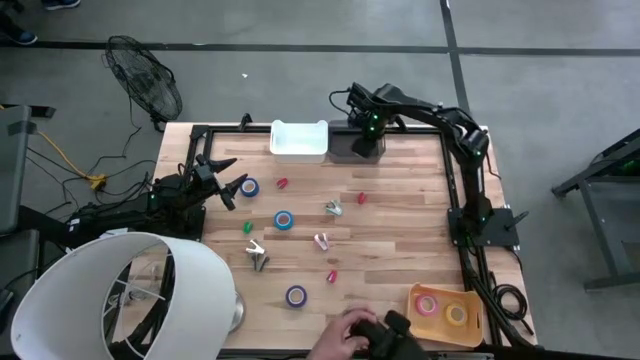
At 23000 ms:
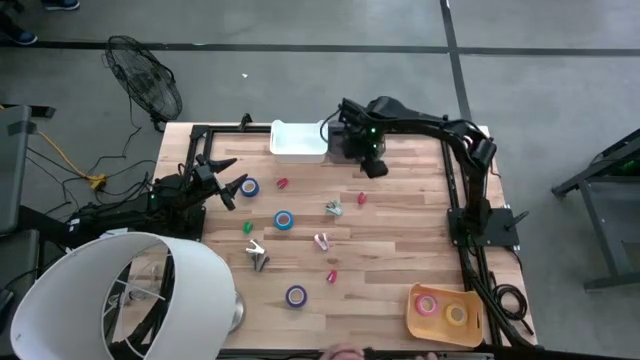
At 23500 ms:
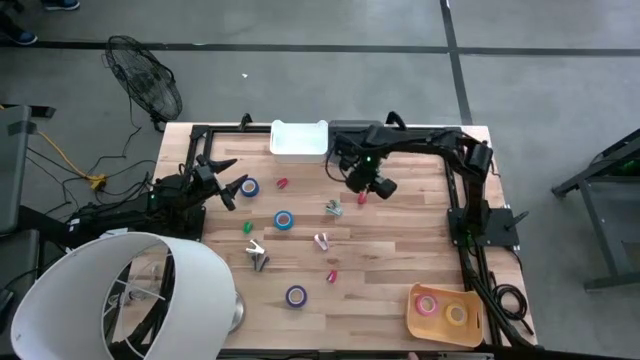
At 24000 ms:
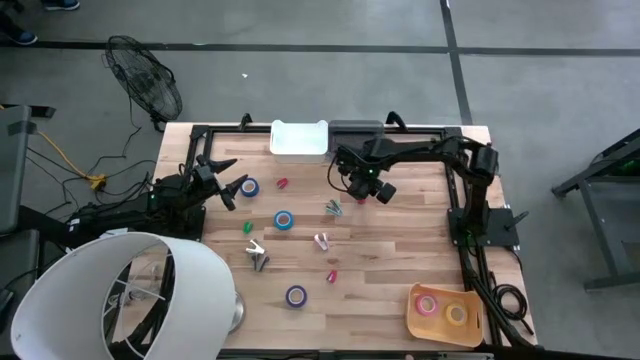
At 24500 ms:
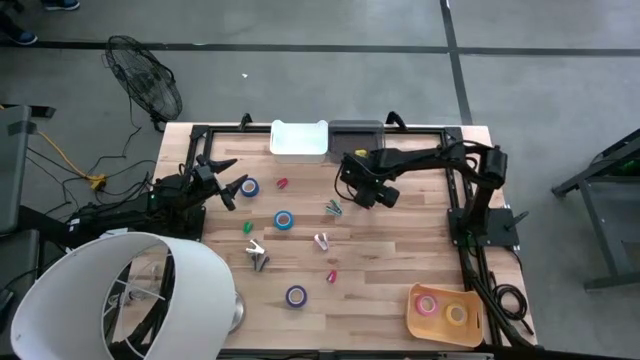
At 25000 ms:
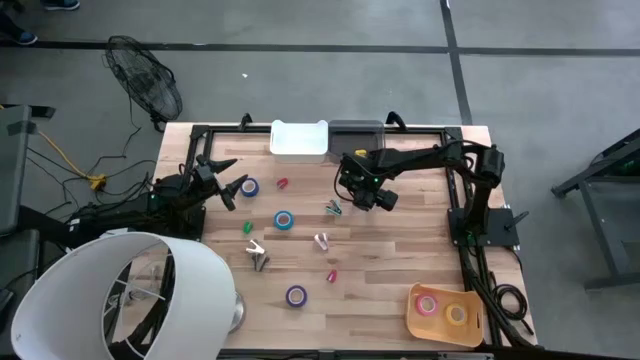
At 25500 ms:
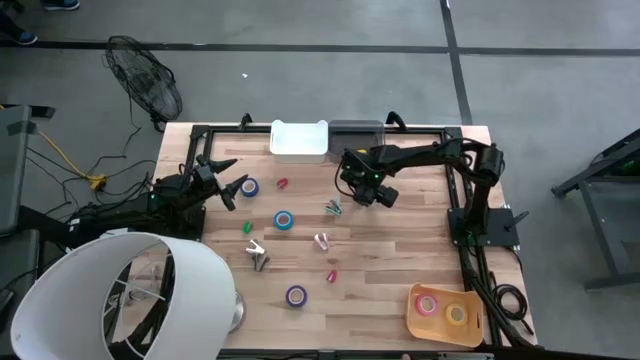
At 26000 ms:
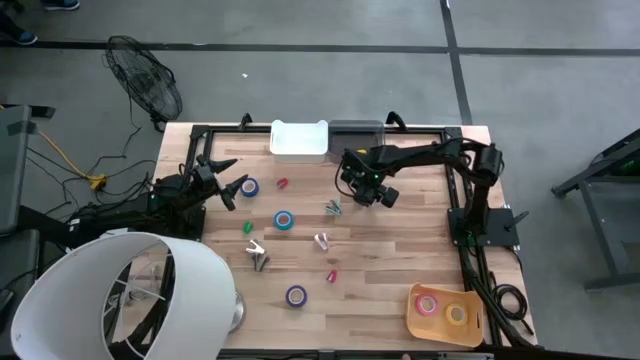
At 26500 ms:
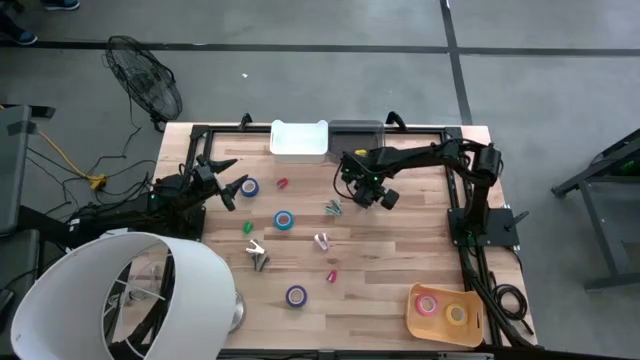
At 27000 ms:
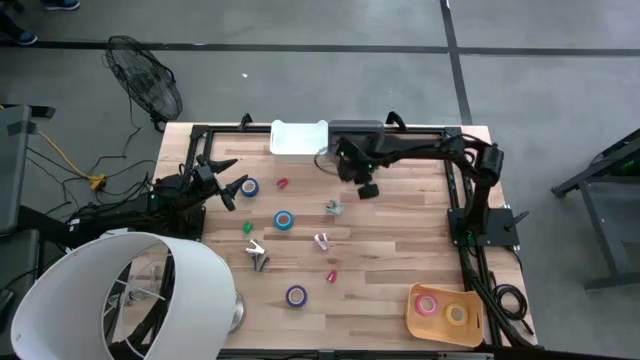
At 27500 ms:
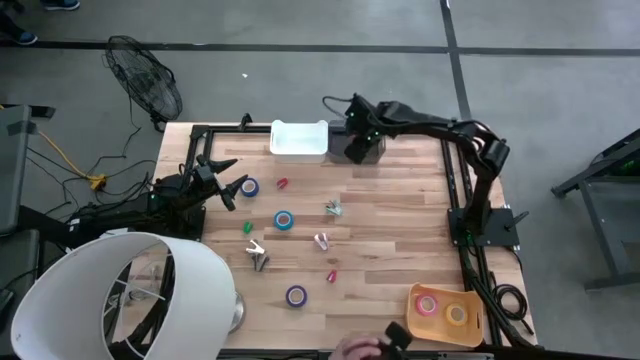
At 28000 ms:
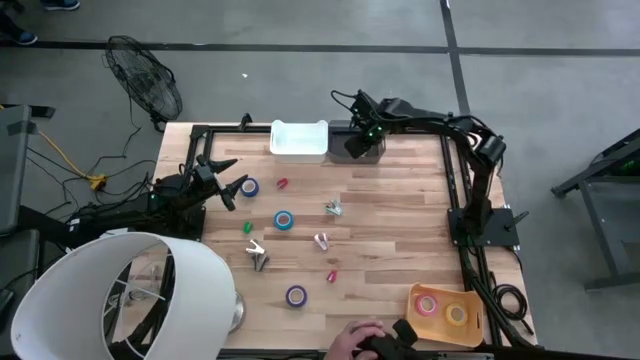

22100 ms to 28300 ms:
Task: Pick and place Stapler, Stapler remover, tape
Put the top right red stapler into the black bin

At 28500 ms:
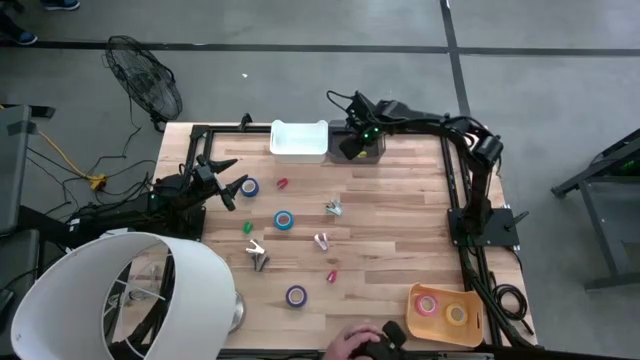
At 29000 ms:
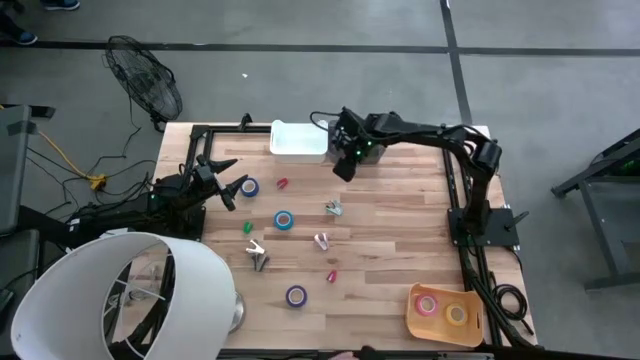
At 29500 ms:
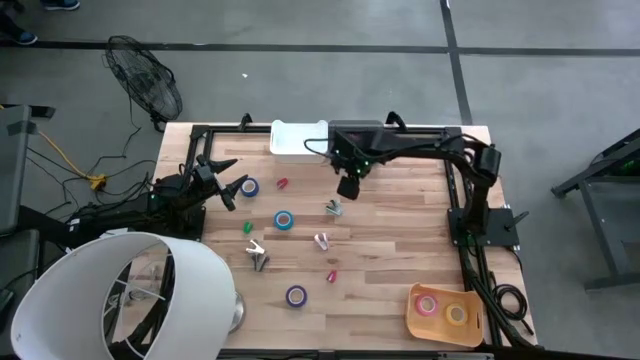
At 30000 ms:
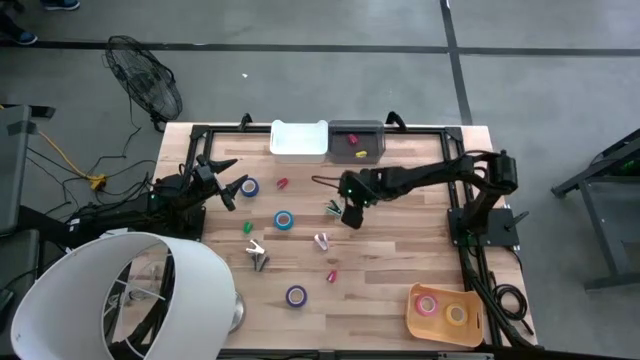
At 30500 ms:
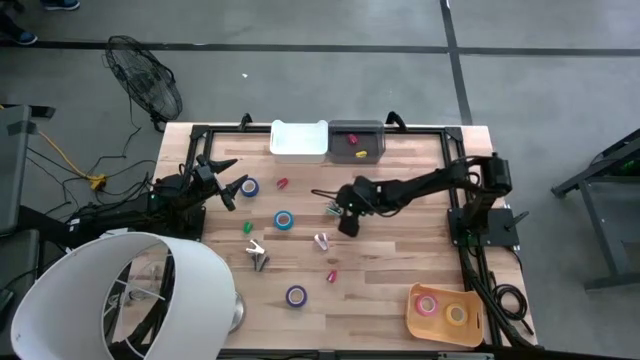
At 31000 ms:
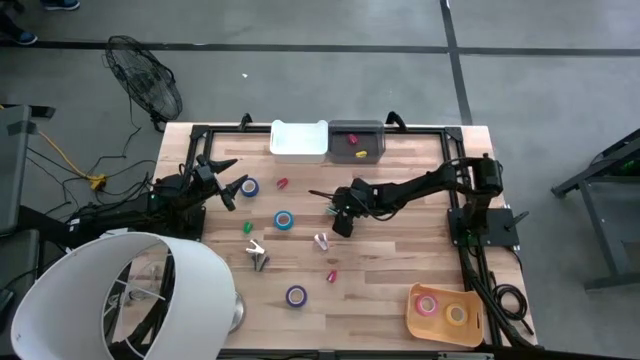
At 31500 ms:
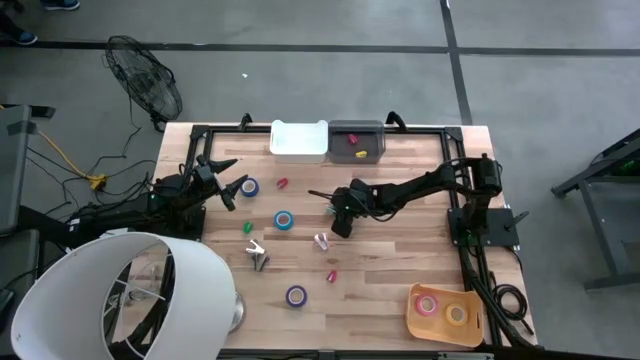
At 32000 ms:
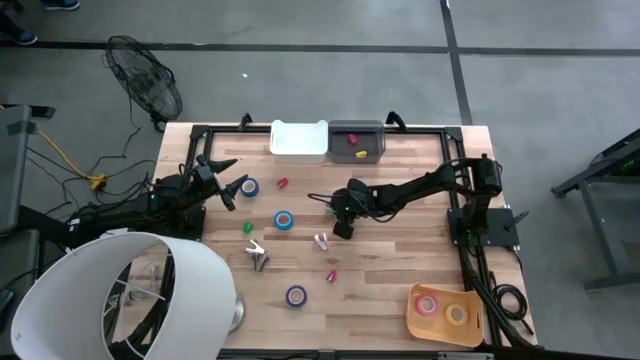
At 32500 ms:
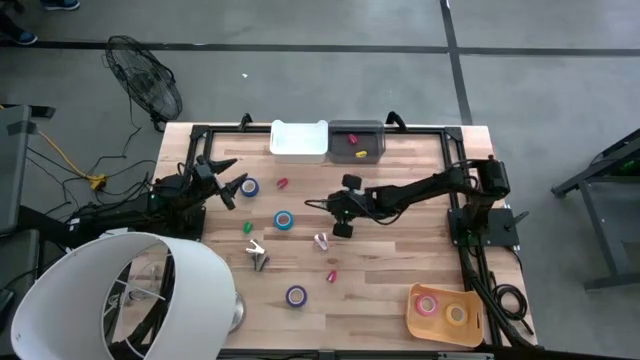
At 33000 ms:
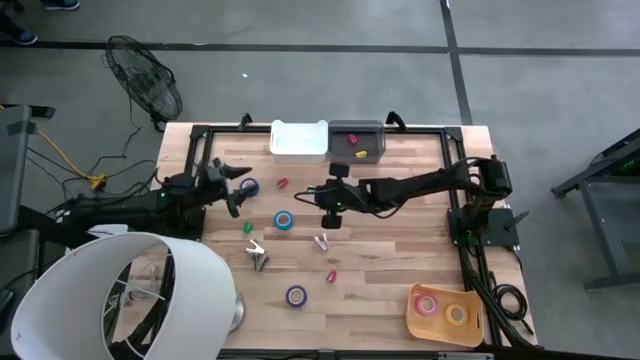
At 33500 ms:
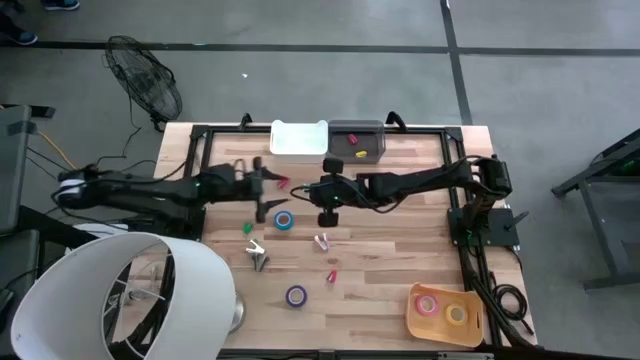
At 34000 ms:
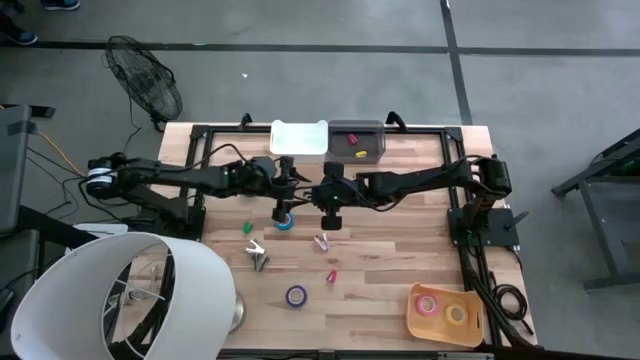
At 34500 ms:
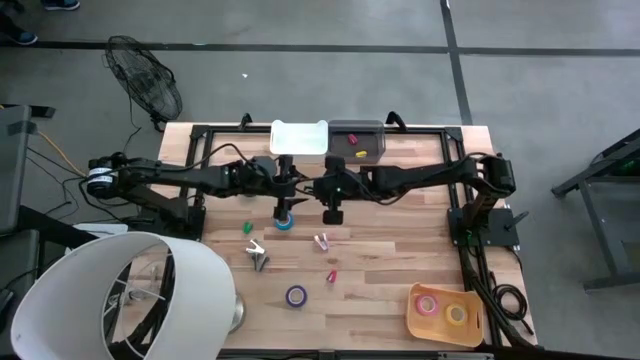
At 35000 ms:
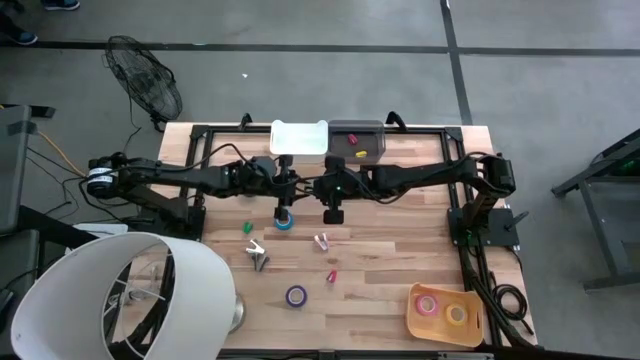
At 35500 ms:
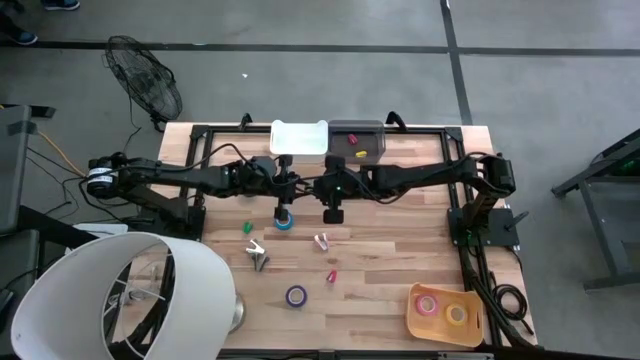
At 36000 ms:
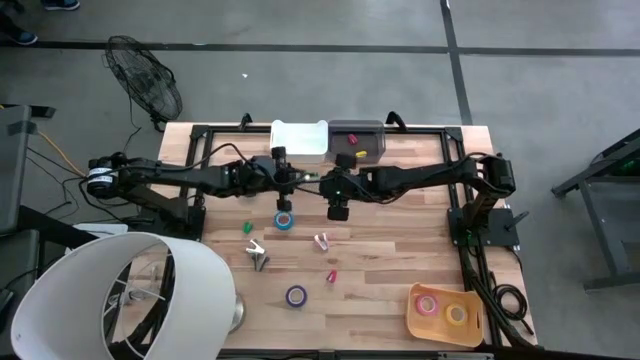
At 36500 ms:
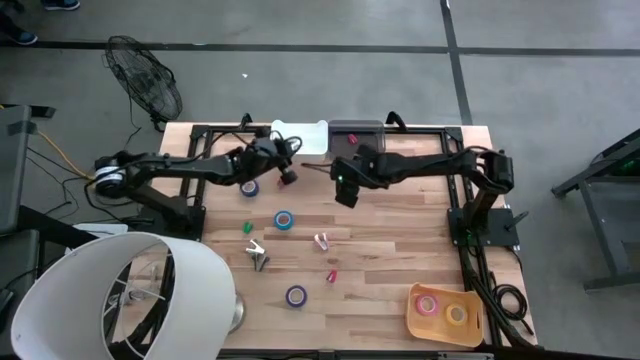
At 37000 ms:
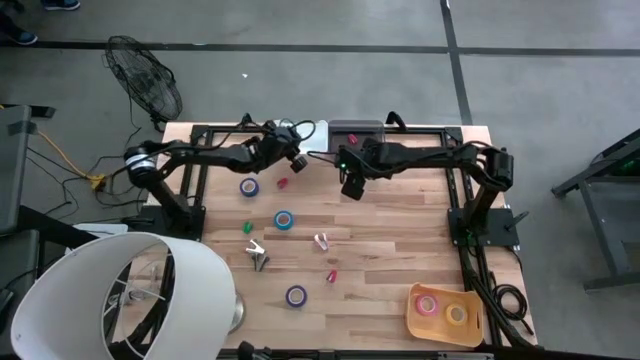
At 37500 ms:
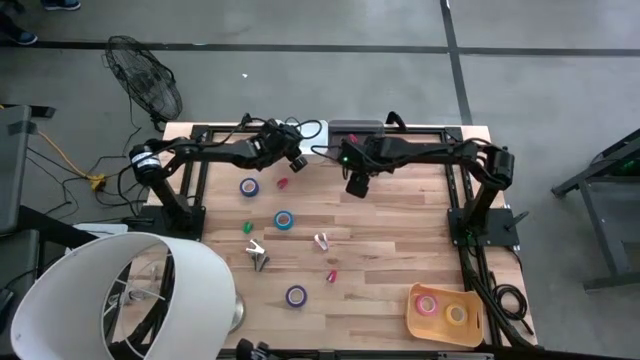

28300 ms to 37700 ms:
Put the blue staple remover into the white bin

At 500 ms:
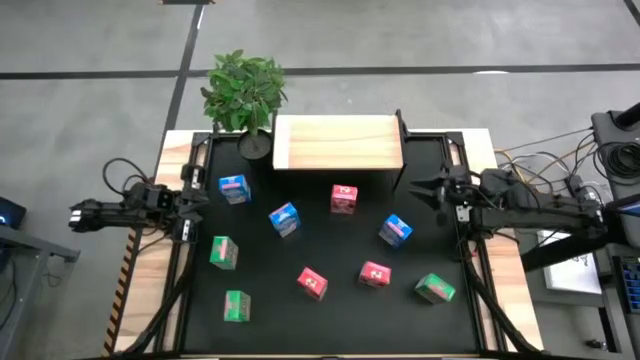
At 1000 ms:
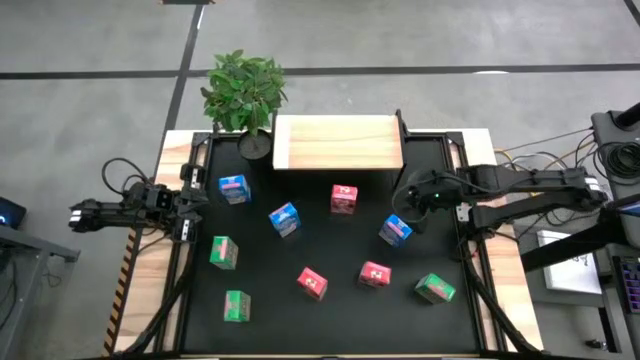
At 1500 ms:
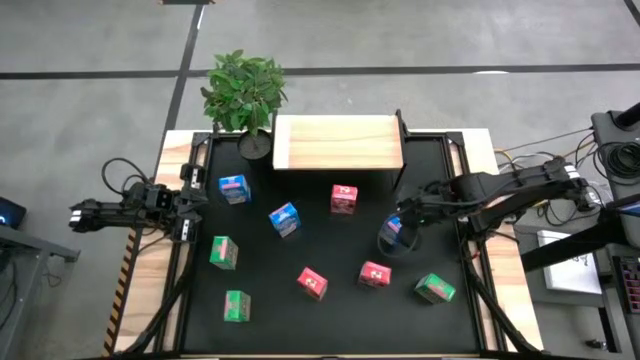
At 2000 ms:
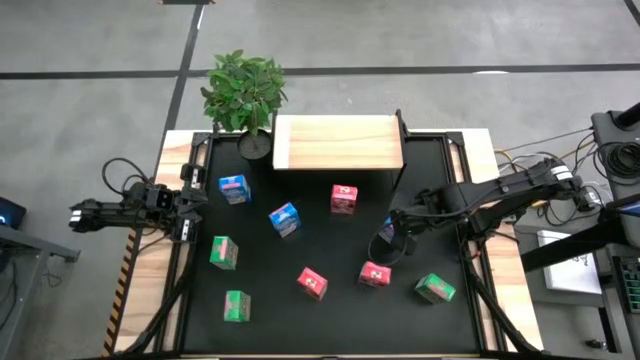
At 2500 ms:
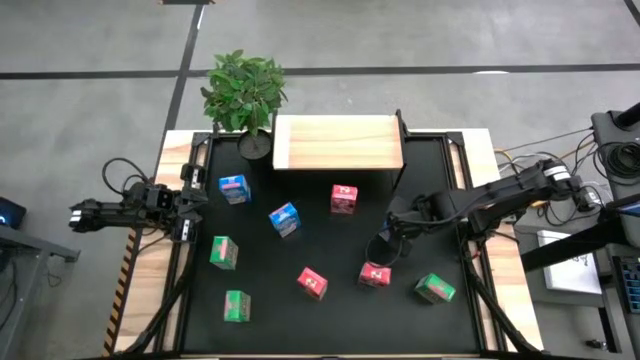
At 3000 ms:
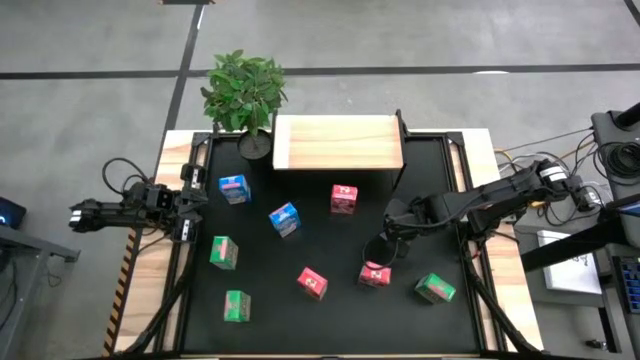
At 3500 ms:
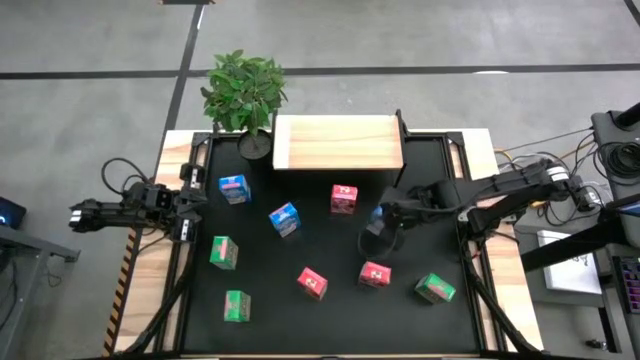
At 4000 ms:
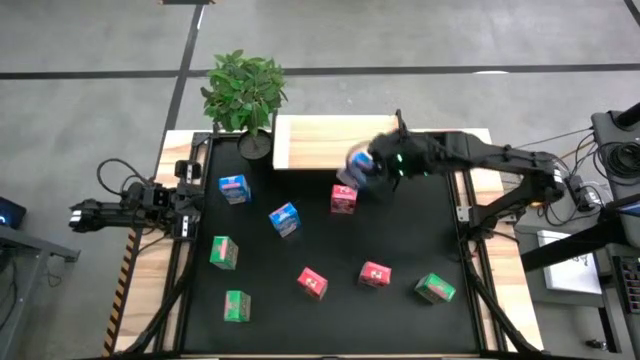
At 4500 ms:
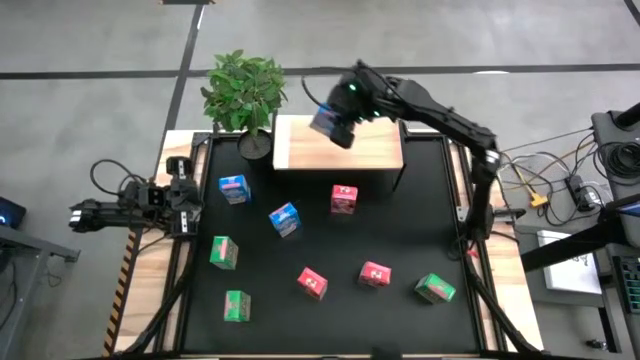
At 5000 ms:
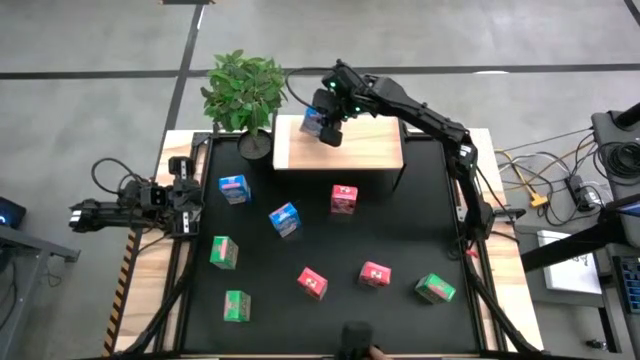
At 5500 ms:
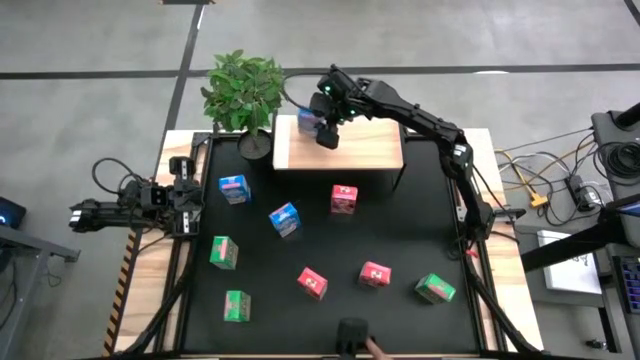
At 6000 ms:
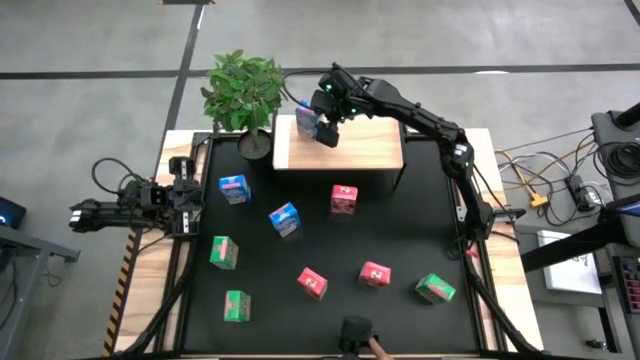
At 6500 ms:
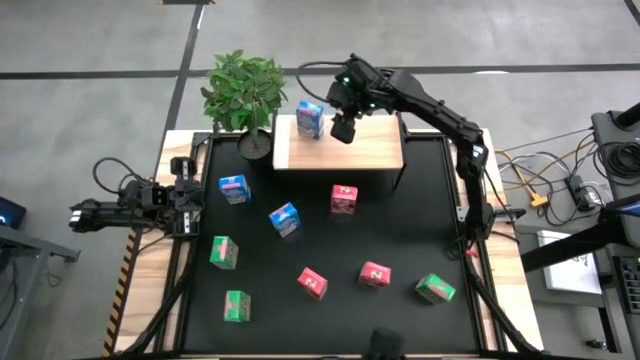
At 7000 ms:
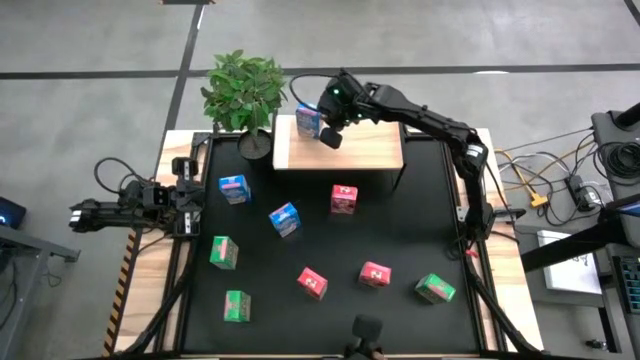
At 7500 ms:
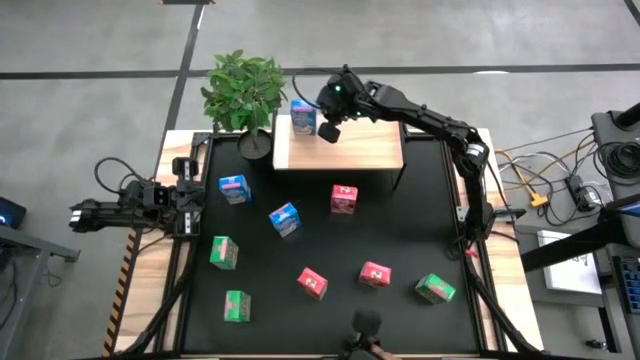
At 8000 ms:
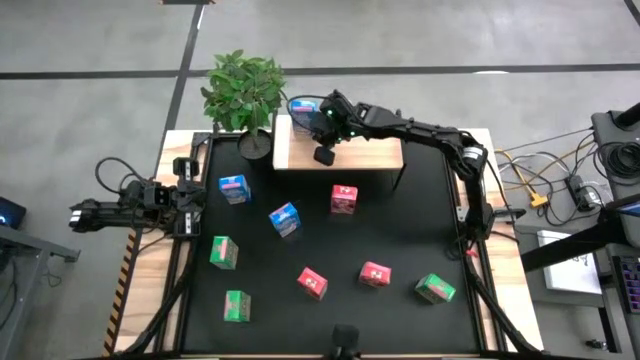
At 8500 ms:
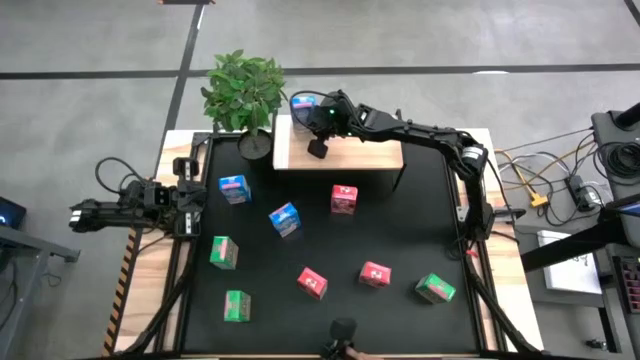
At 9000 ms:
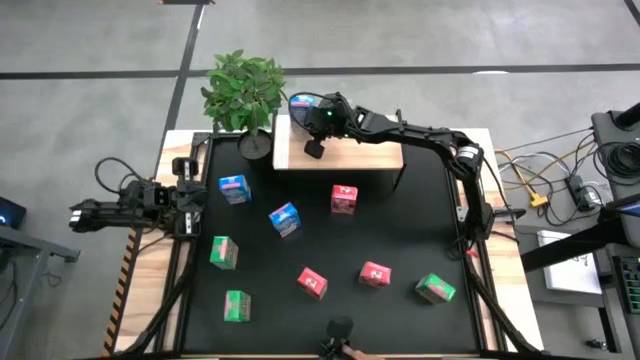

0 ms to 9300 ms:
Task: Stack cereal on shelf
Put the bottom right blue cereal box on the shelf
